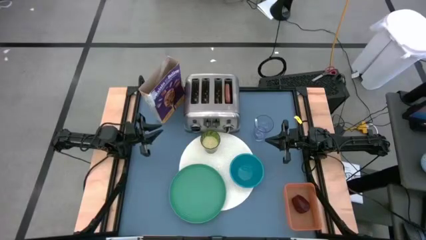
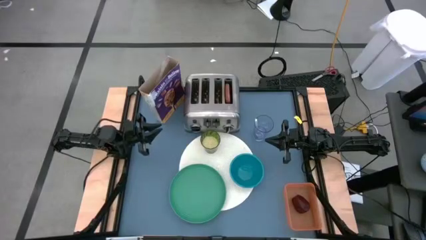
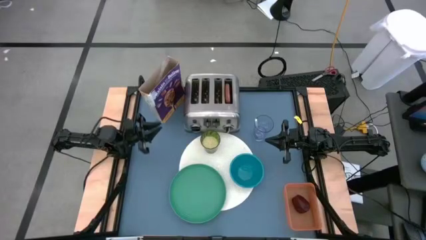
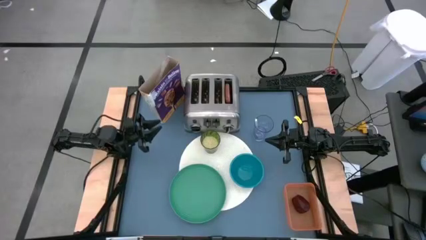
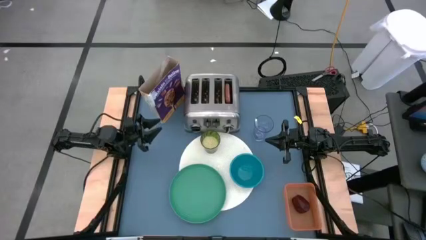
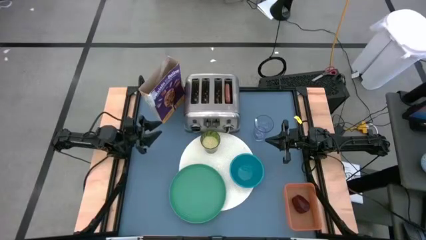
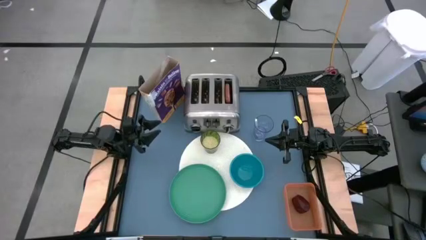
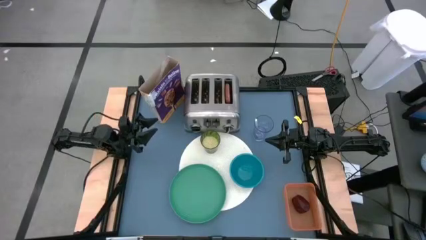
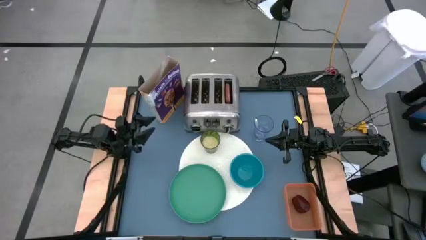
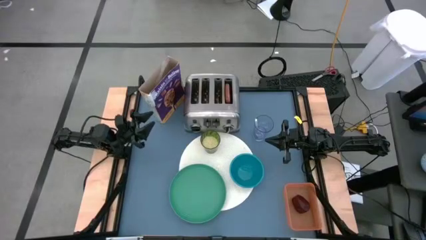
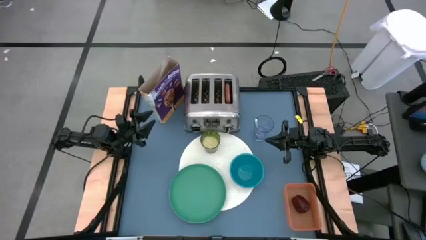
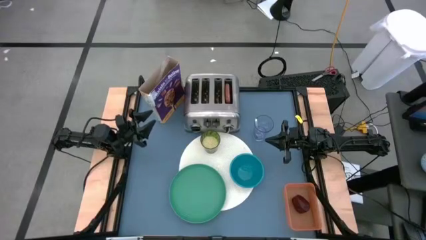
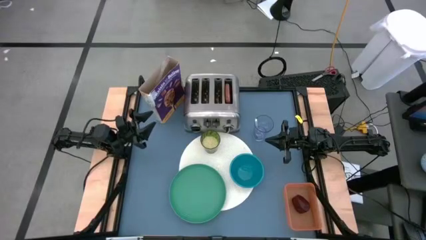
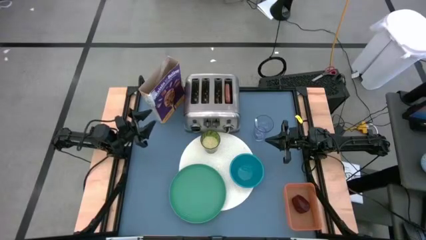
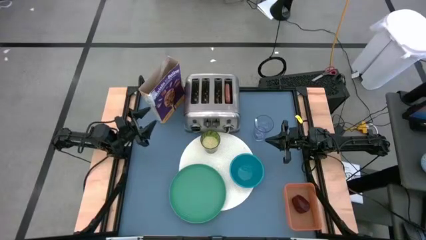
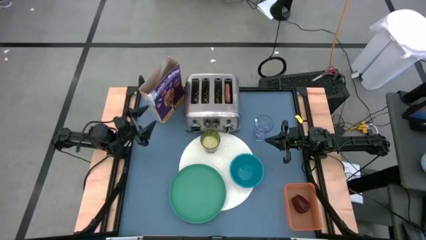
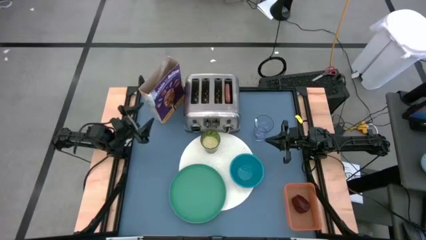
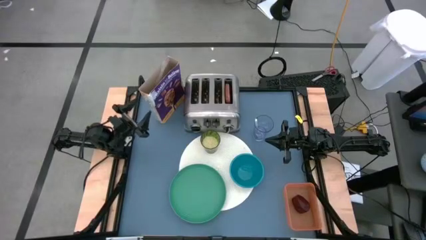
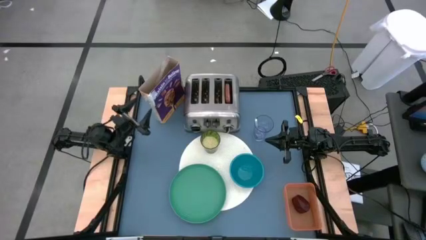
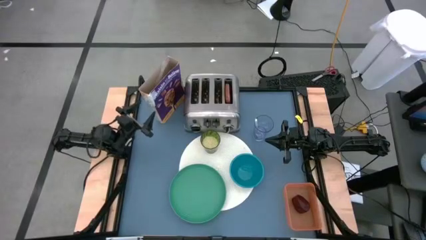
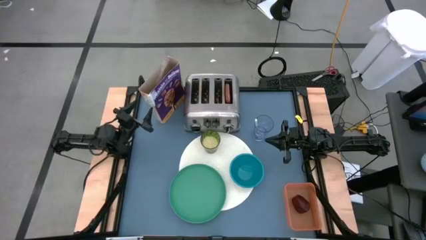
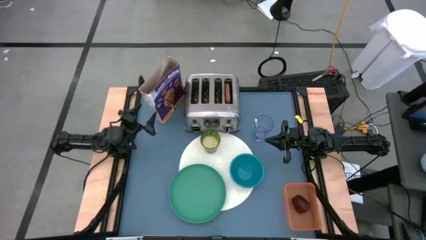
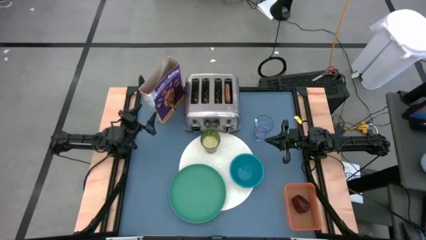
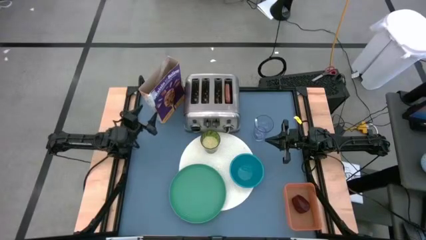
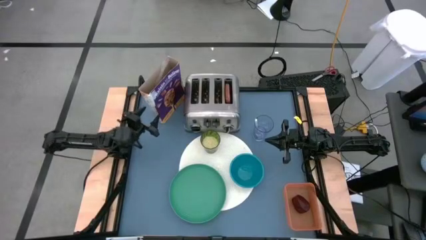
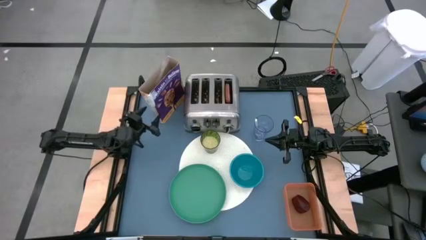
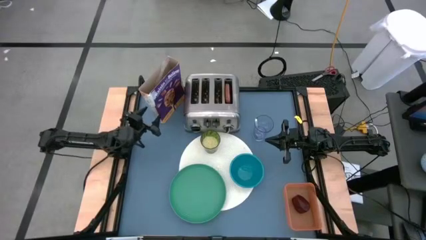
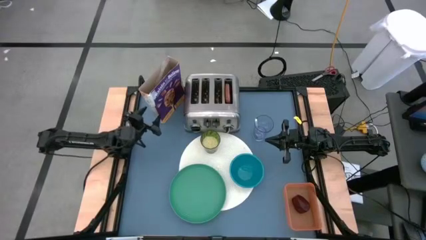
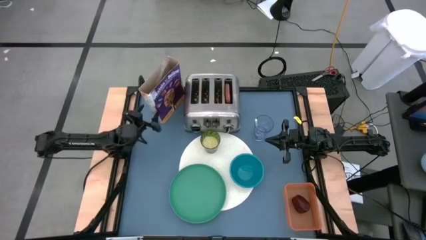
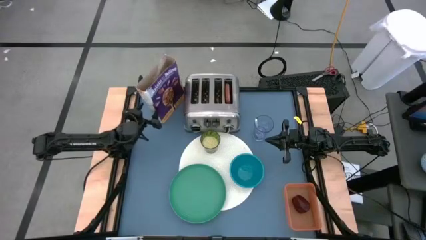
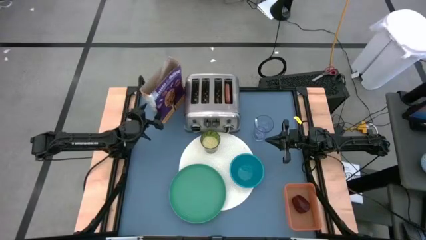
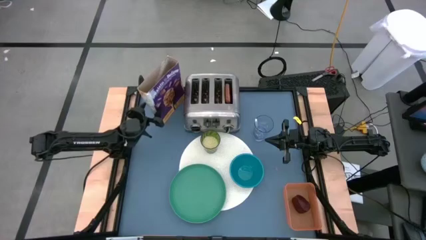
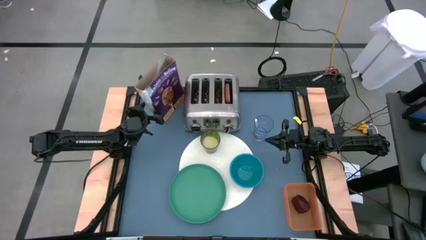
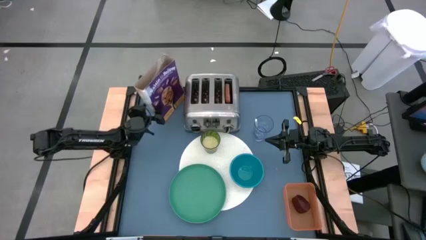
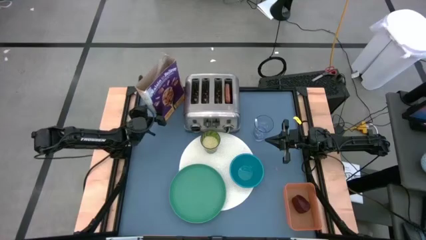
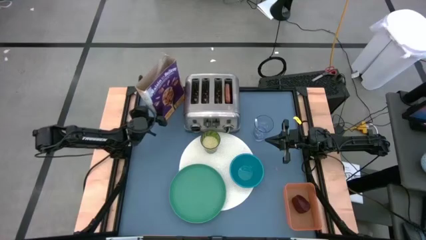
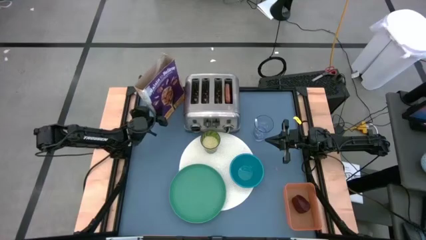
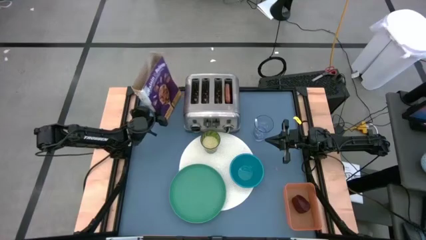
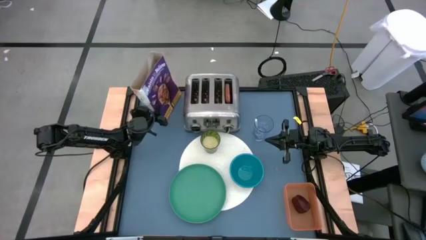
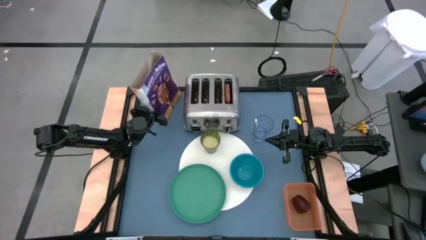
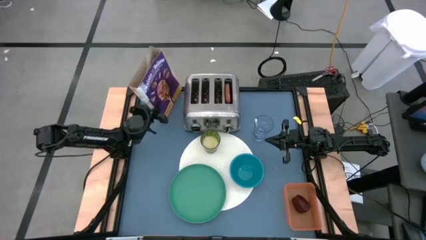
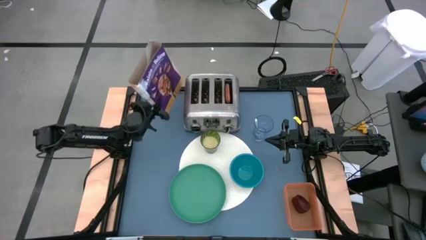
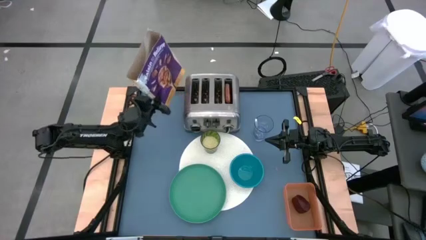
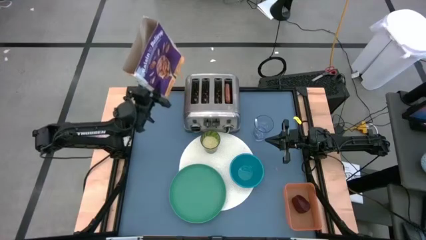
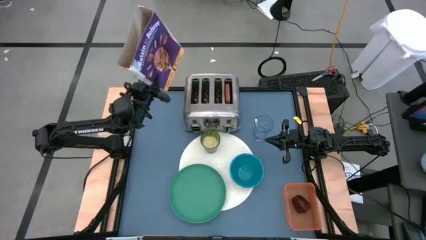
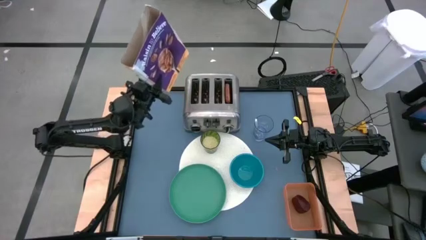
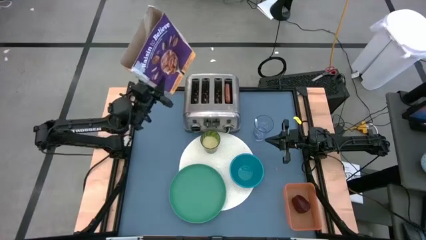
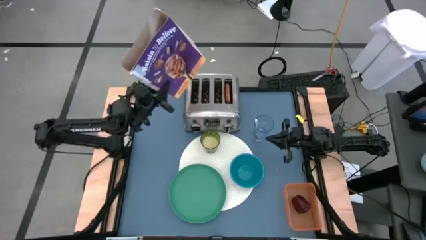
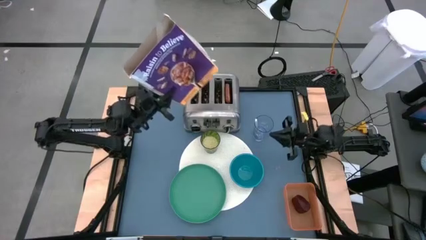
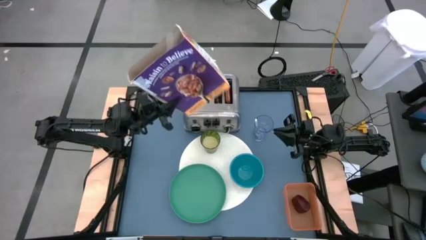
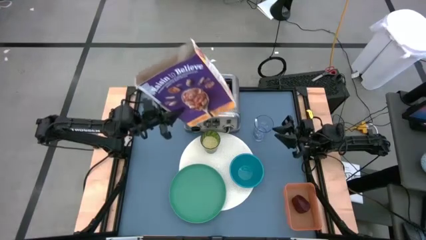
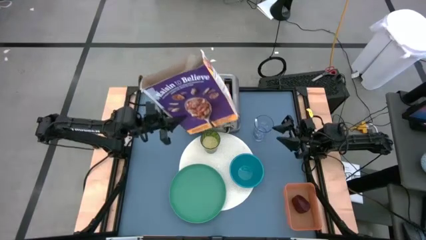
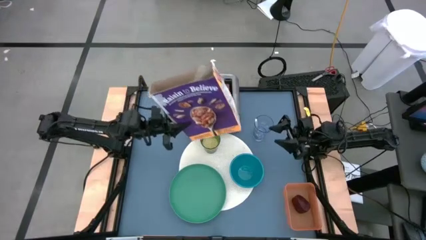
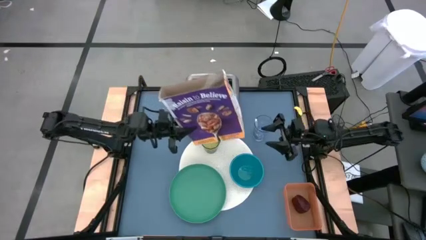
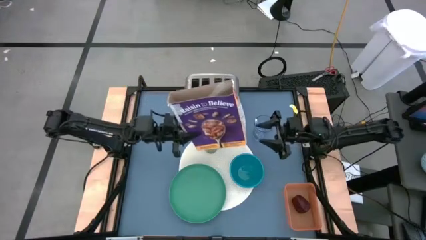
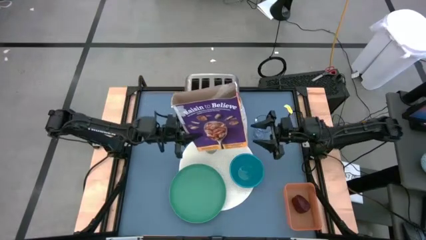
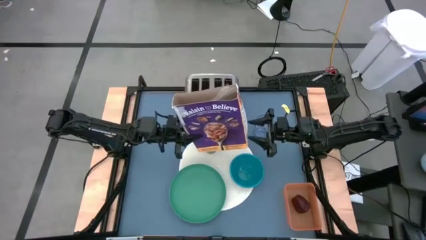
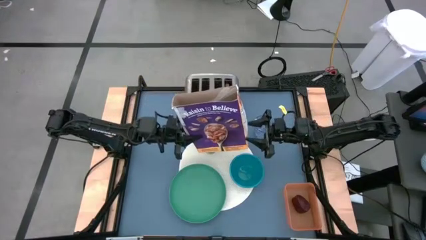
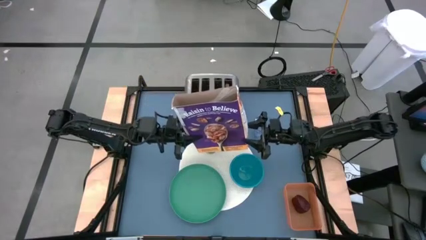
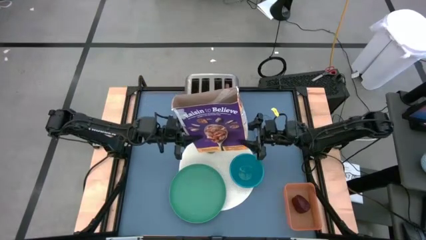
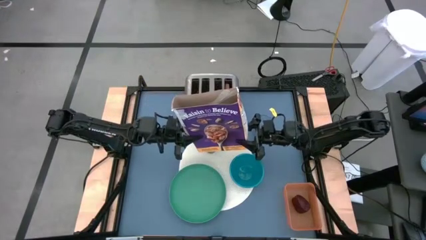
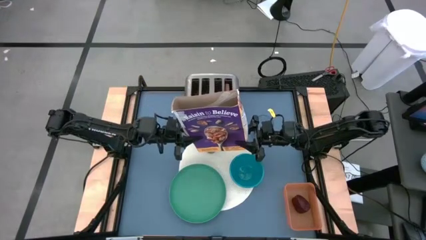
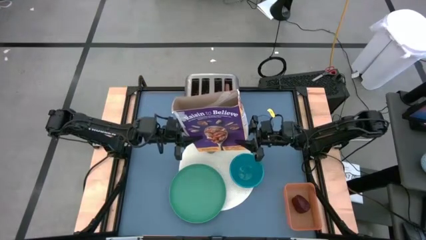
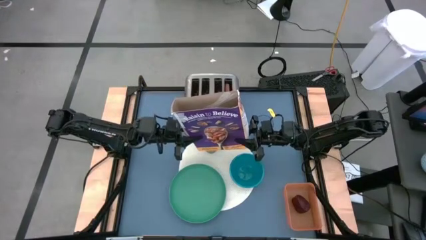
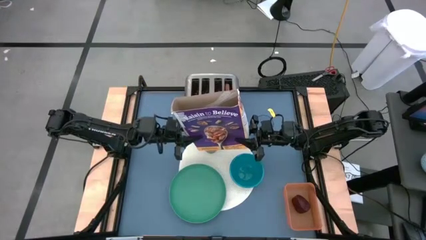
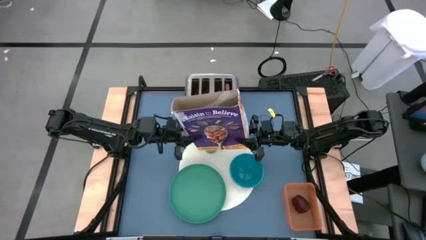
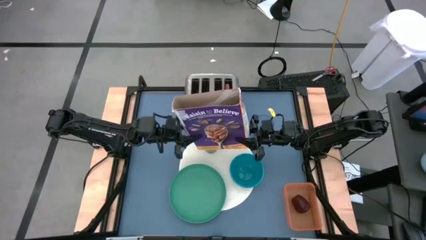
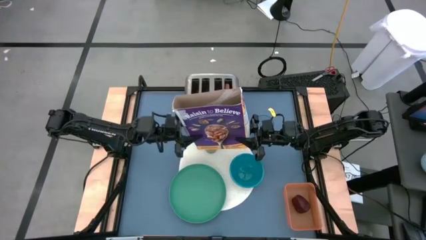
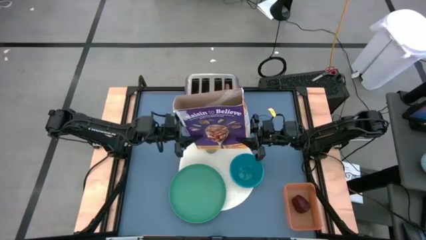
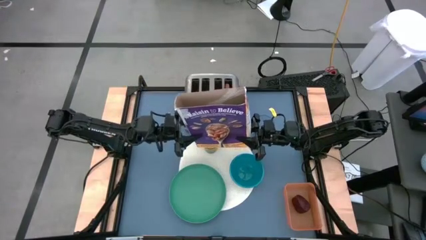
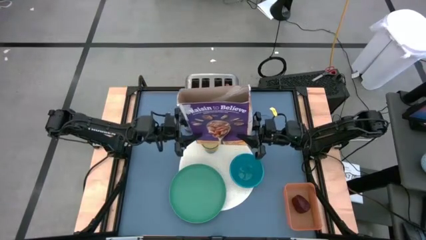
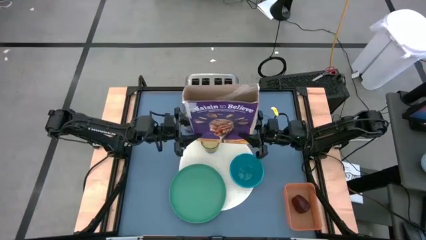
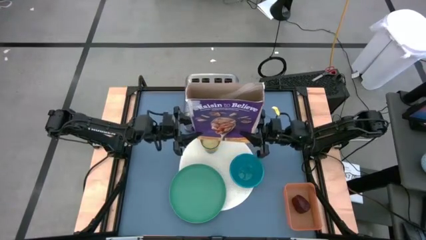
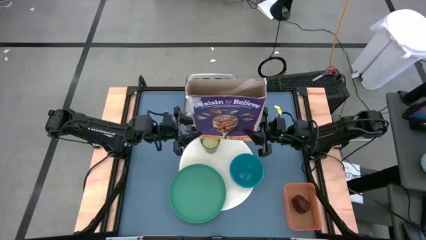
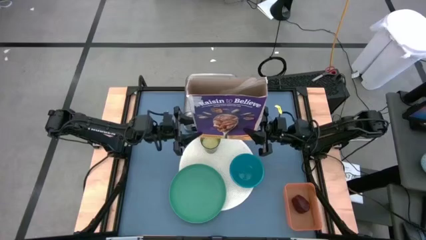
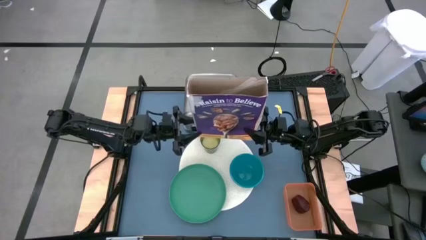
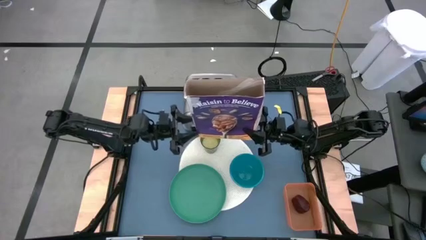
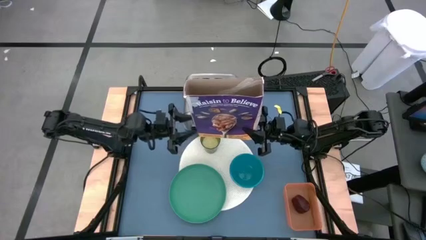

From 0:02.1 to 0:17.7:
Task: Arrange a breakfast setting
Pour the cereal into the blue bowl
